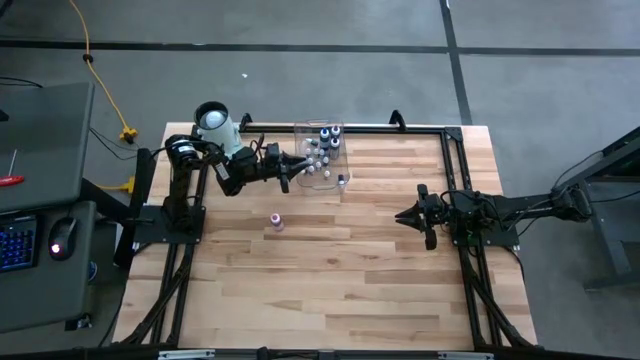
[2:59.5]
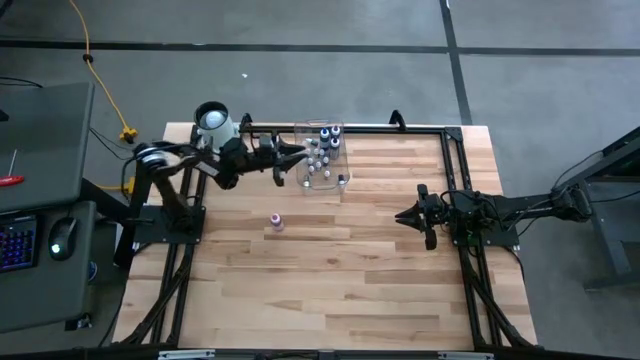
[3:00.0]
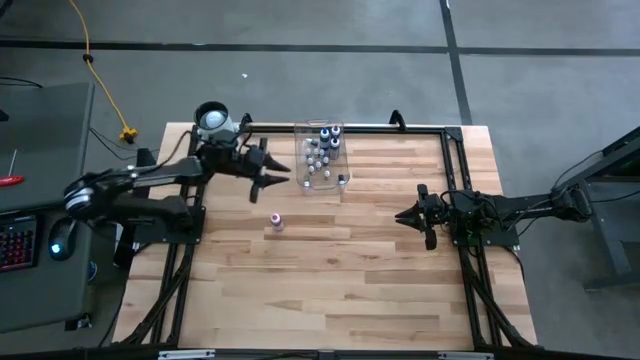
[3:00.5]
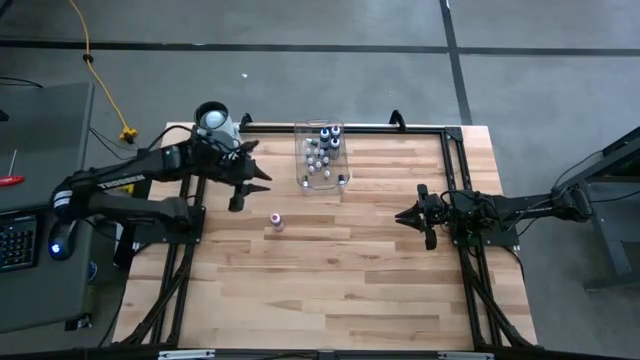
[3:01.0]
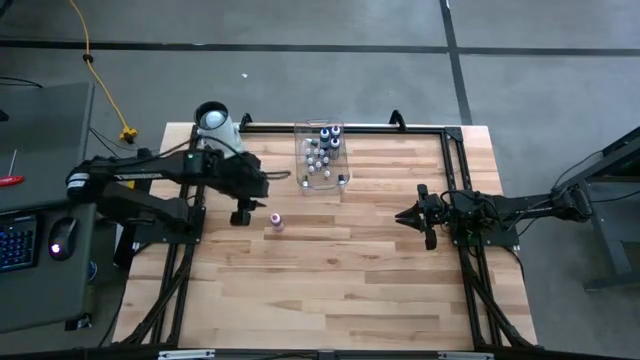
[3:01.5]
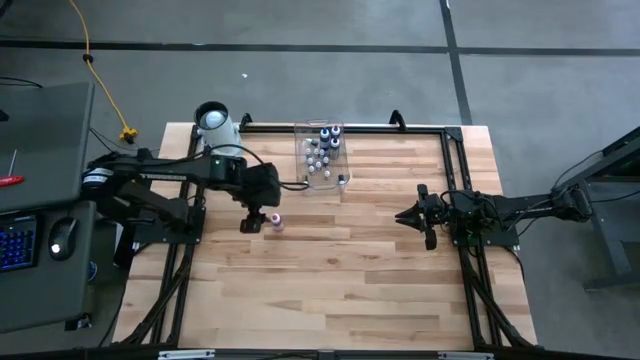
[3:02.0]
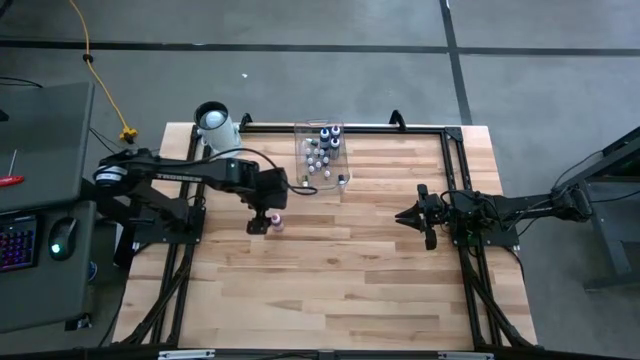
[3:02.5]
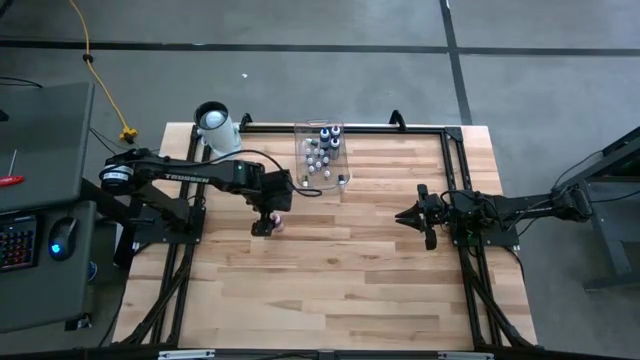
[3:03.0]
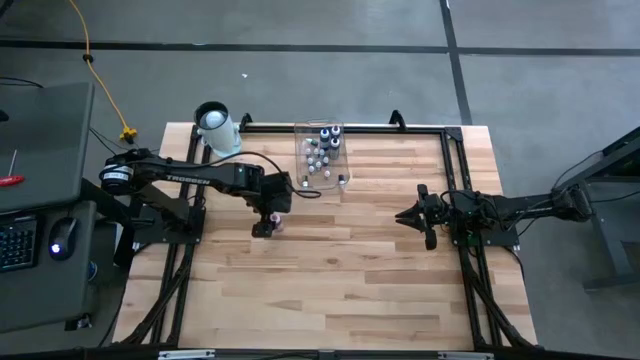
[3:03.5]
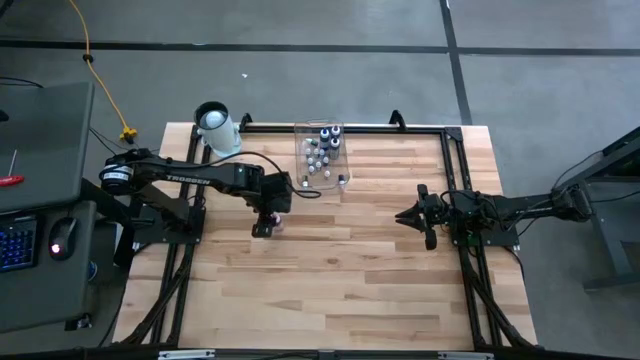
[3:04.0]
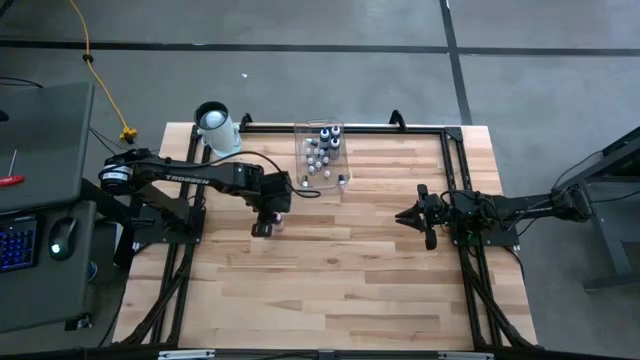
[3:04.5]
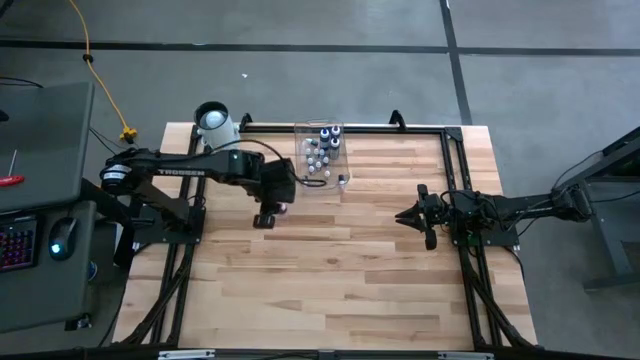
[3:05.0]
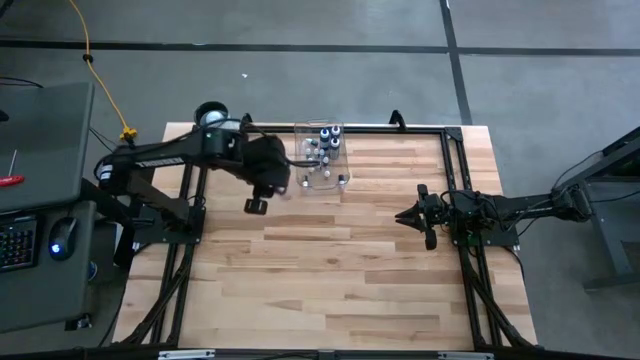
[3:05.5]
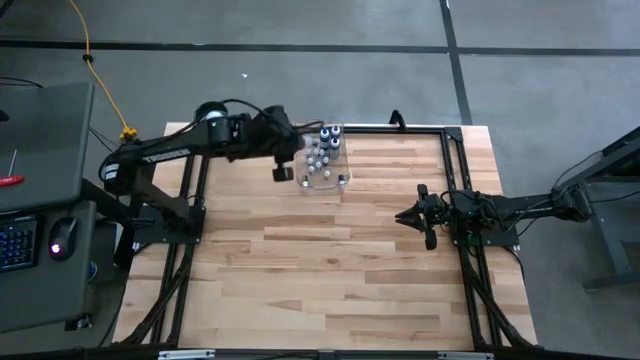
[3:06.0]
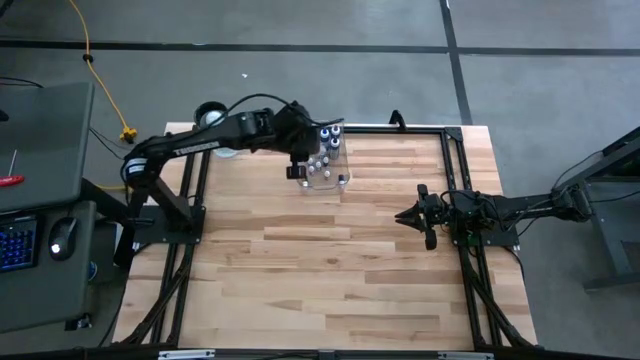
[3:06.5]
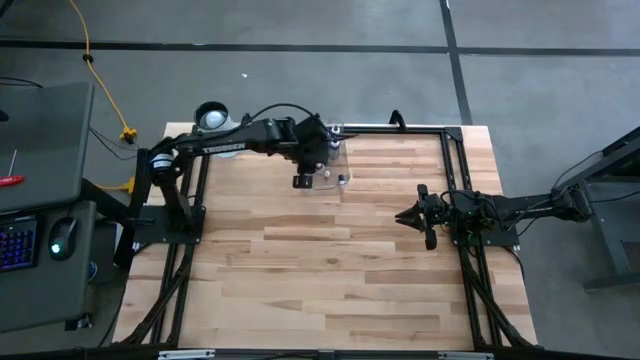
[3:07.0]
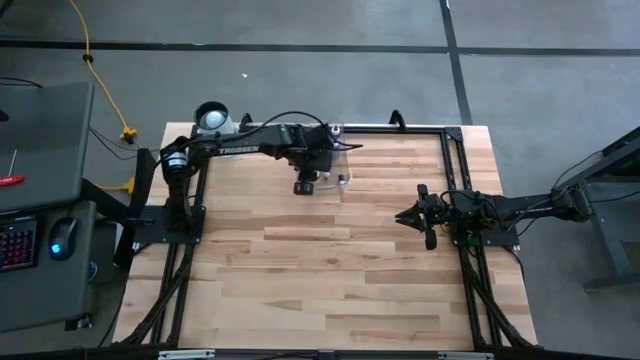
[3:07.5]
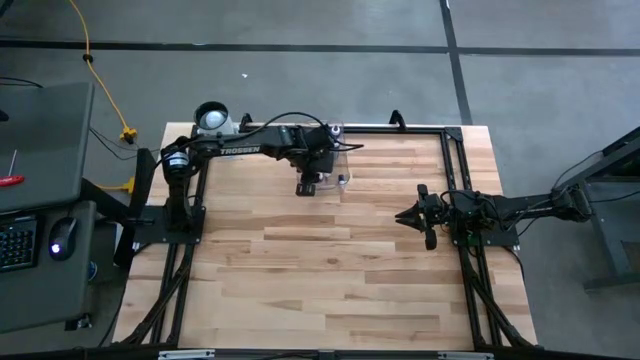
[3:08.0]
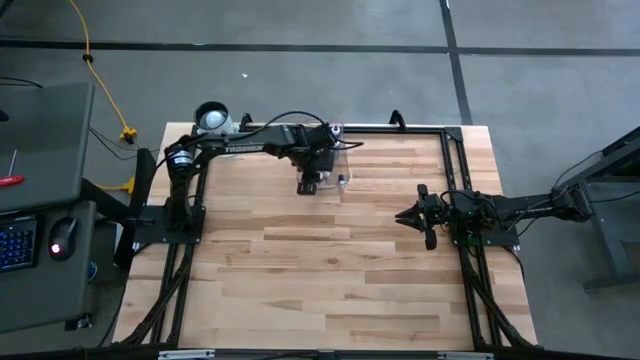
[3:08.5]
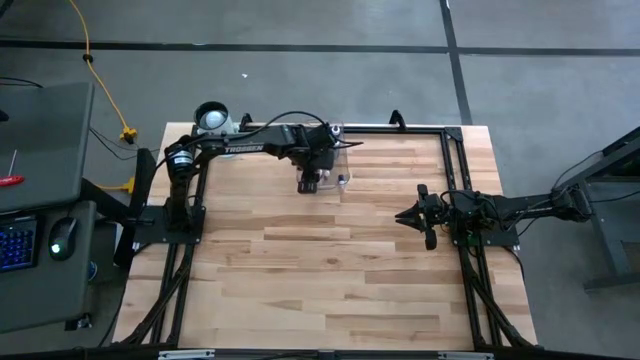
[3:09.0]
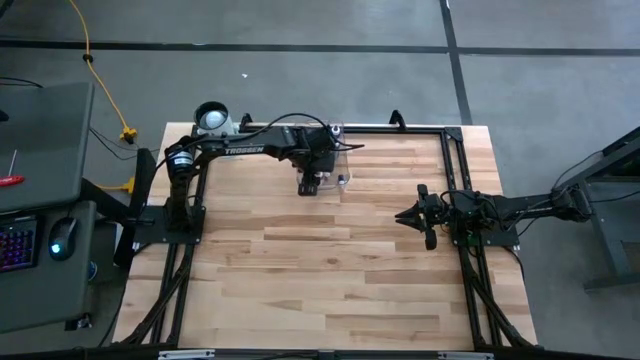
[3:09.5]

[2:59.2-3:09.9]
Task: Pick & Place food coloring
Put the large pink food coloring bottle into the container

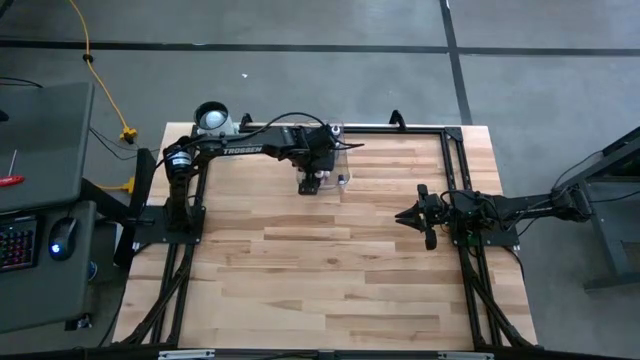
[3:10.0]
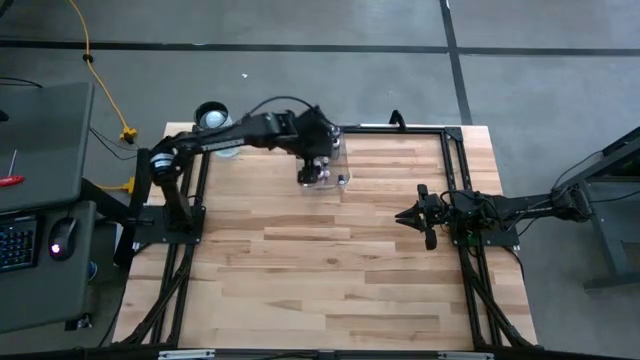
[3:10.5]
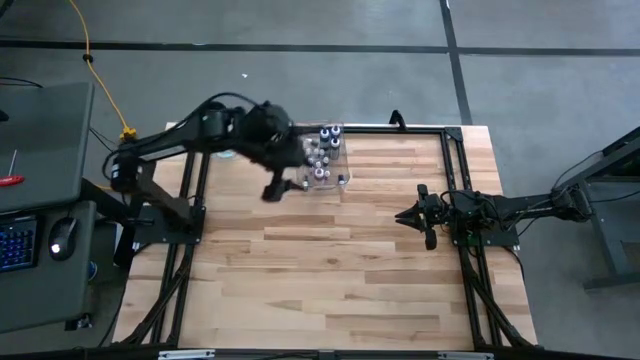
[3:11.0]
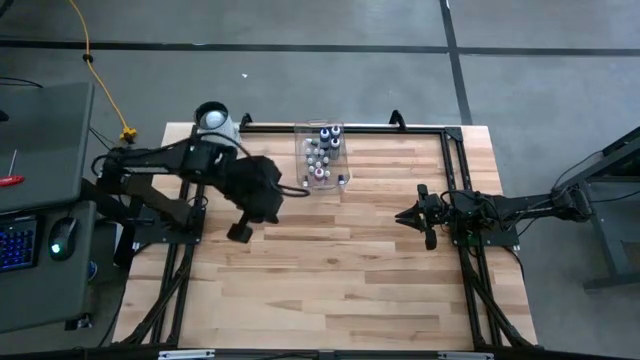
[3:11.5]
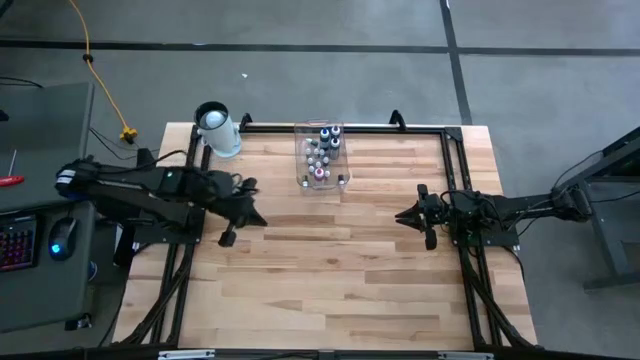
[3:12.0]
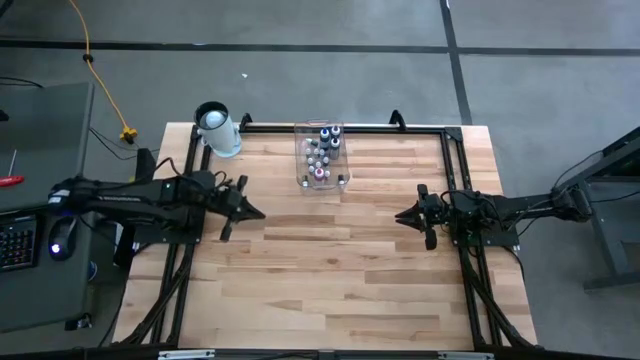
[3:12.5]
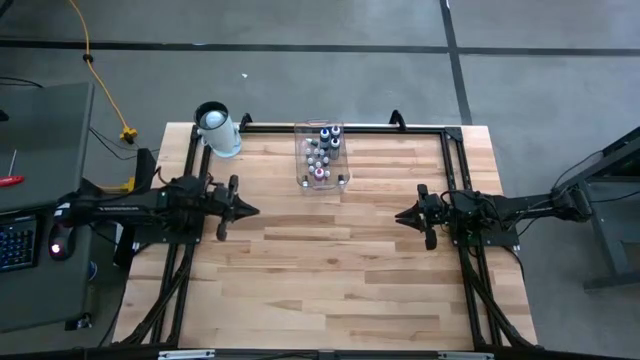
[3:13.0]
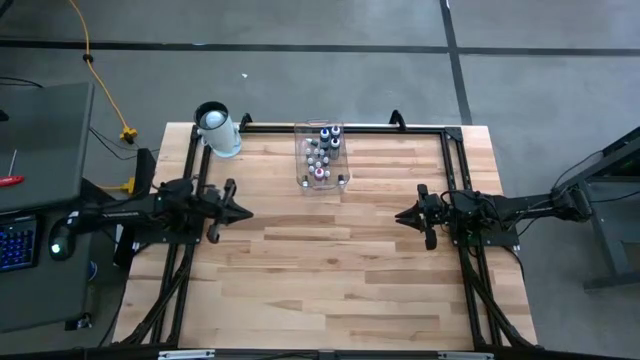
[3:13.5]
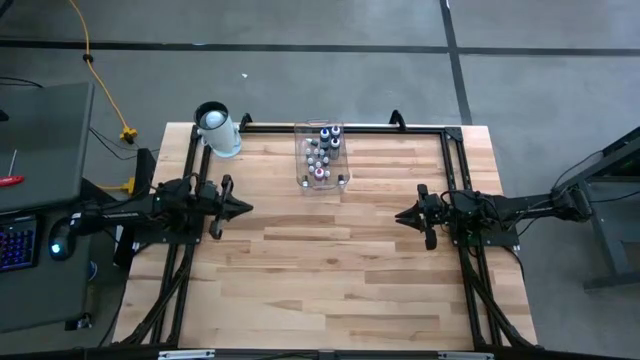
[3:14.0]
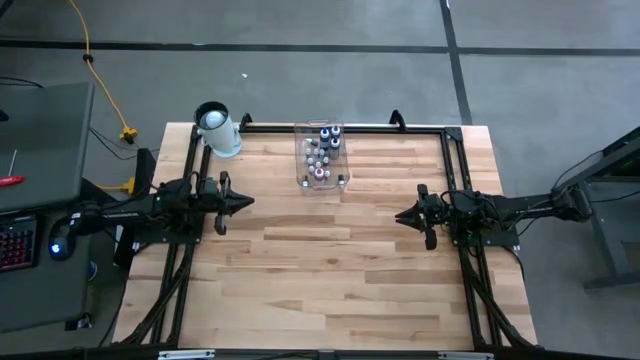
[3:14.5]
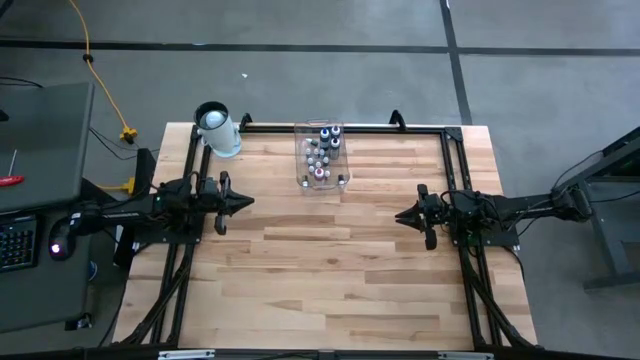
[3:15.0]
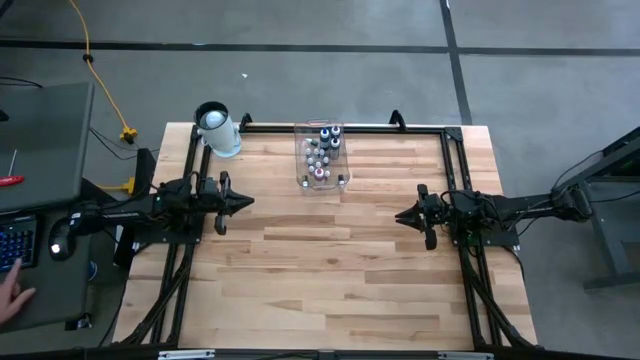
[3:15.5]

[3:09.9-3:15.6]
Return to Home Position

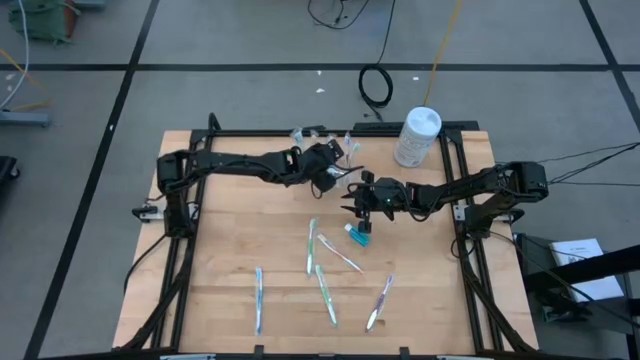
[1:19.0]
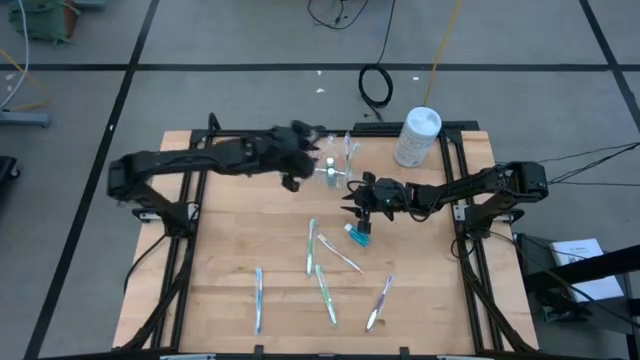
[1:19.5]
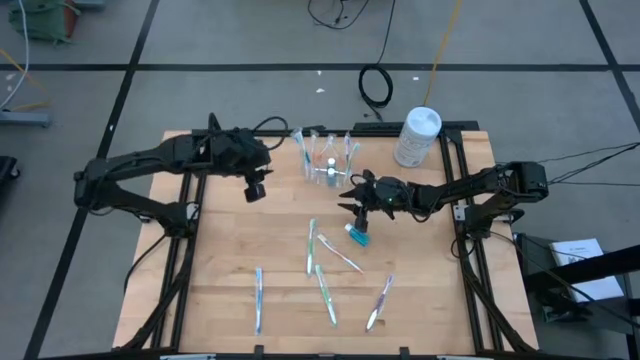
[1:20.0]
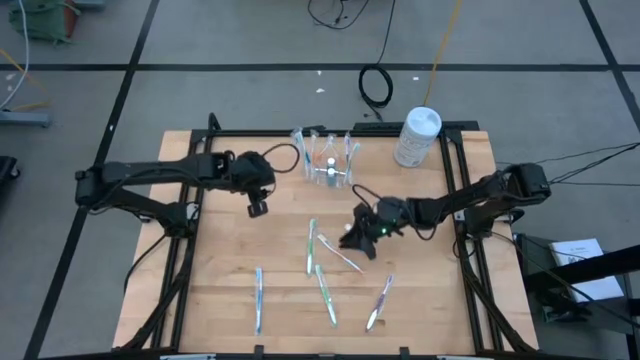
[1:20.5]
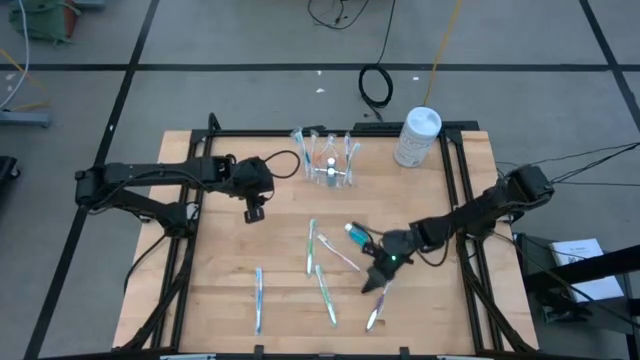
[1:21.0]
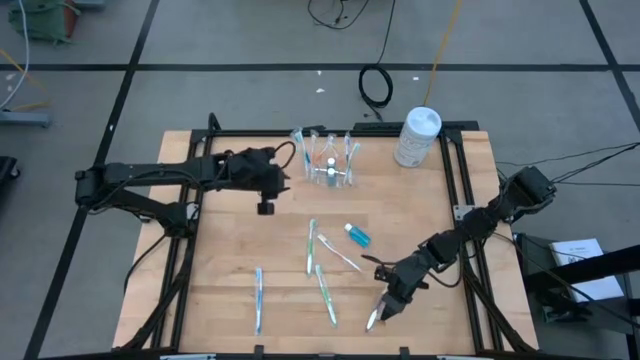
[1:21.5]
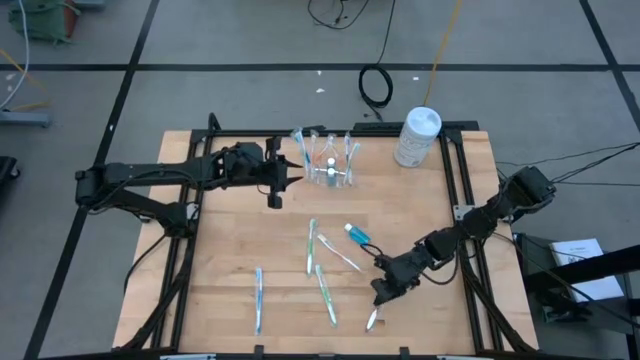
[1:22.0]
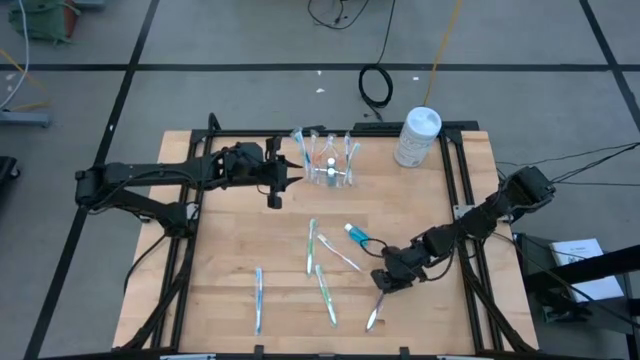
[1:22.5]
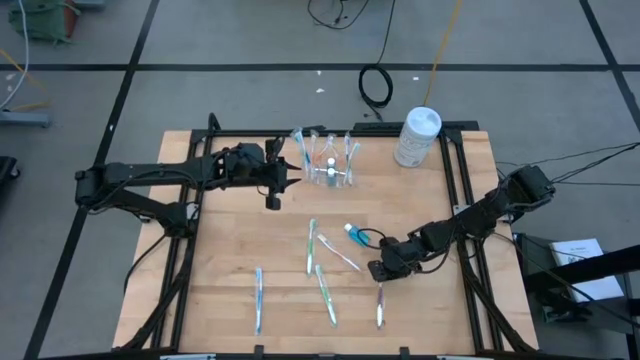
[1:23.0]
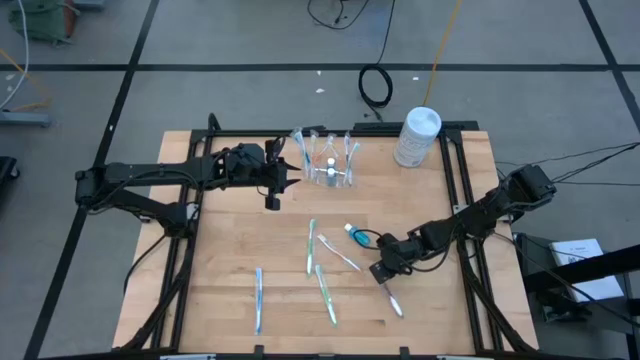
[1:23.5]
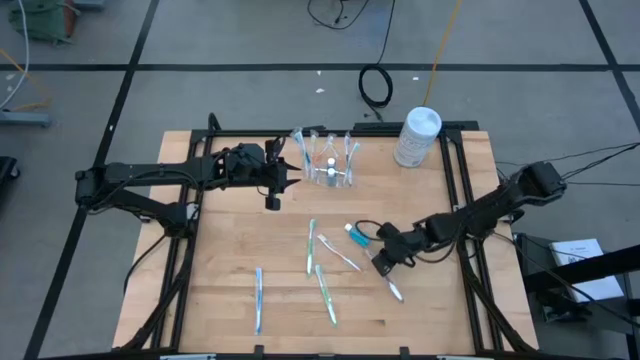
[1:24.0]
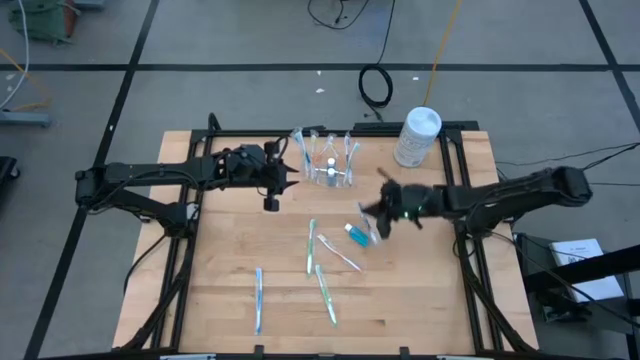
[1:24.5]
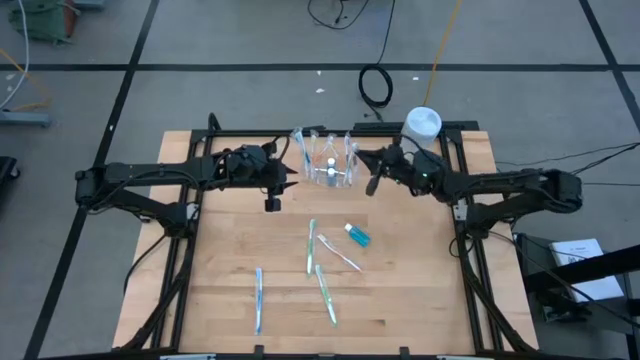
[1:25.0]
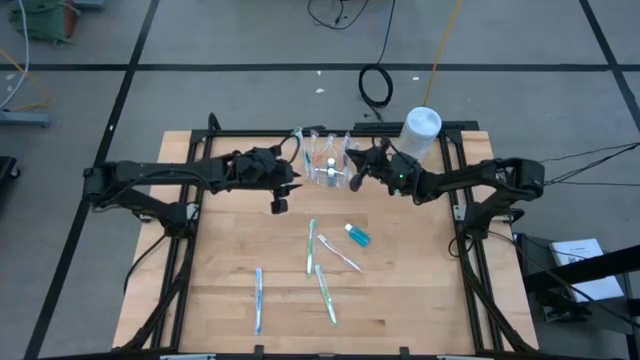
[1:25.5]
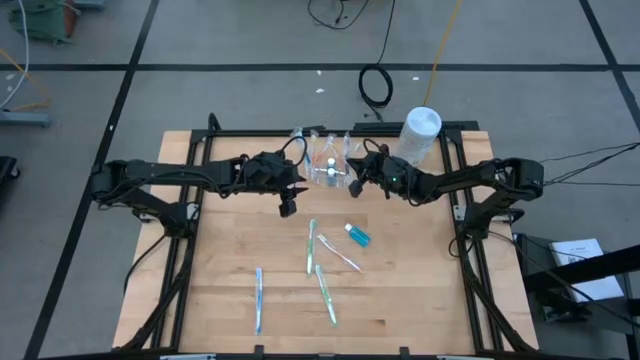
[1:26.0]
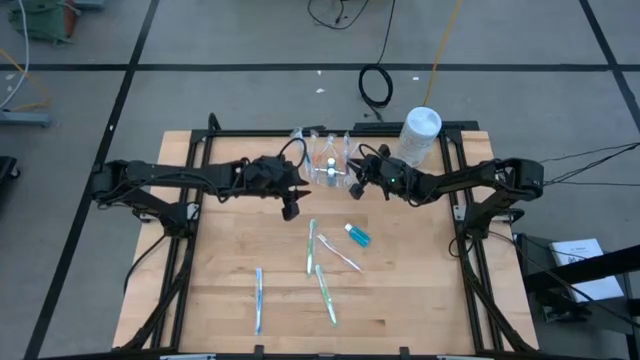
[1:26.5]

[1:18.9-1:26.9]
Task: Pick & Place toothbrushing station
Put the purple toothbrush into the transparent organizer
